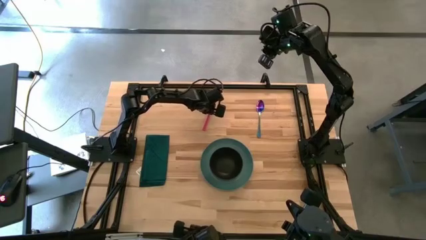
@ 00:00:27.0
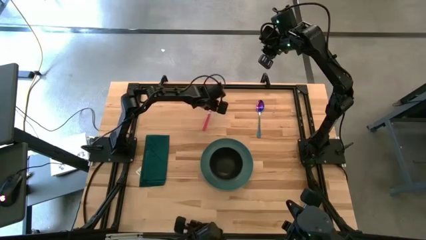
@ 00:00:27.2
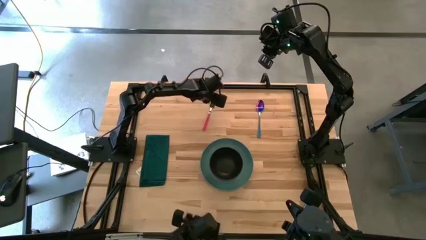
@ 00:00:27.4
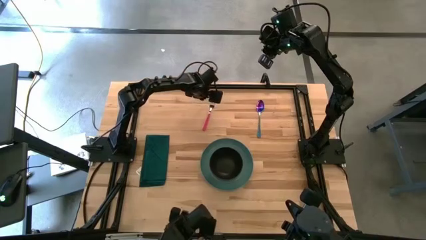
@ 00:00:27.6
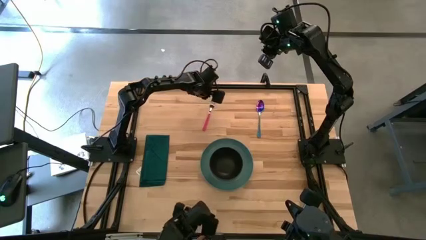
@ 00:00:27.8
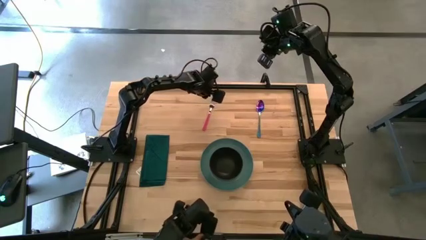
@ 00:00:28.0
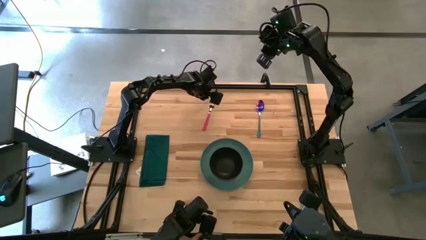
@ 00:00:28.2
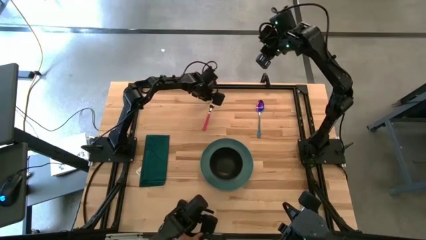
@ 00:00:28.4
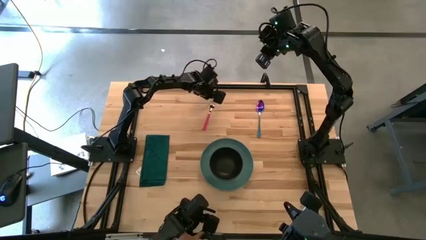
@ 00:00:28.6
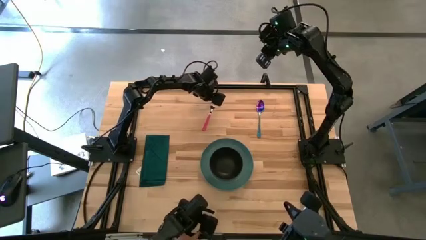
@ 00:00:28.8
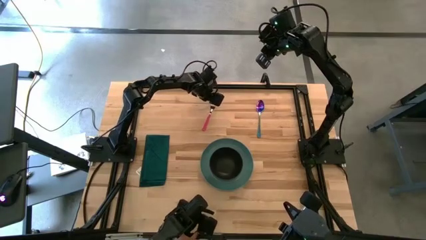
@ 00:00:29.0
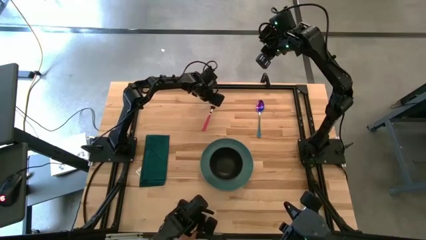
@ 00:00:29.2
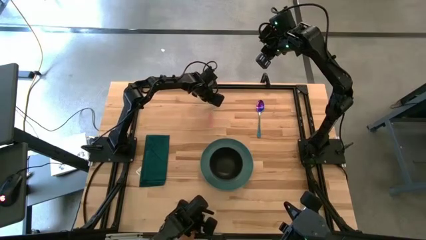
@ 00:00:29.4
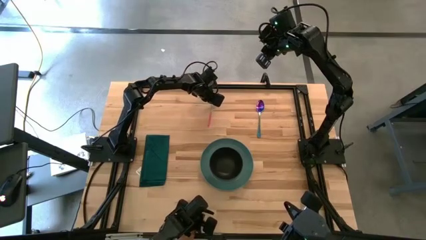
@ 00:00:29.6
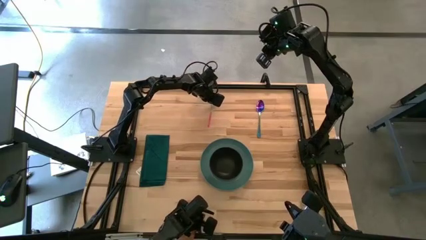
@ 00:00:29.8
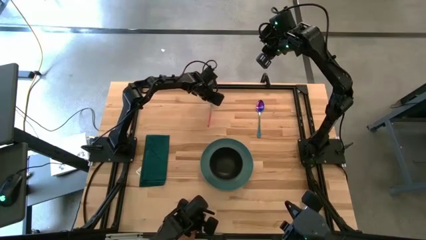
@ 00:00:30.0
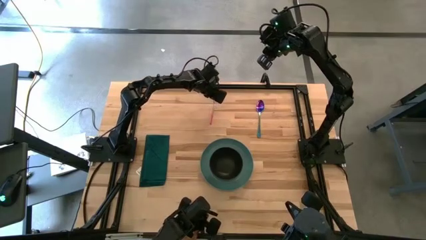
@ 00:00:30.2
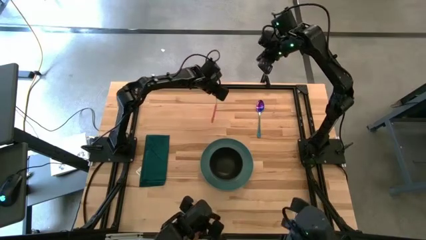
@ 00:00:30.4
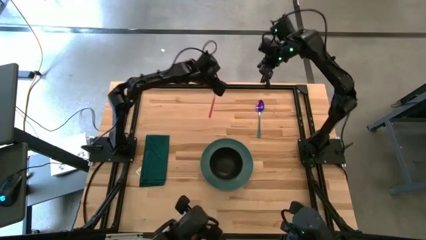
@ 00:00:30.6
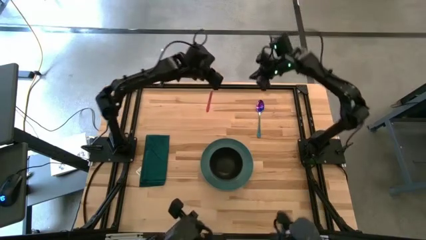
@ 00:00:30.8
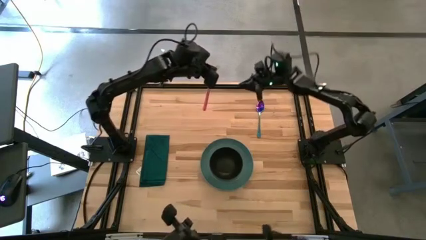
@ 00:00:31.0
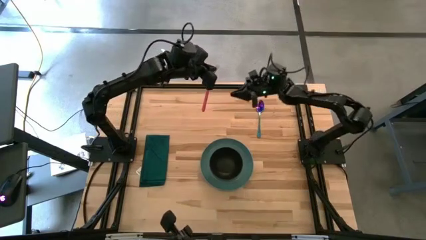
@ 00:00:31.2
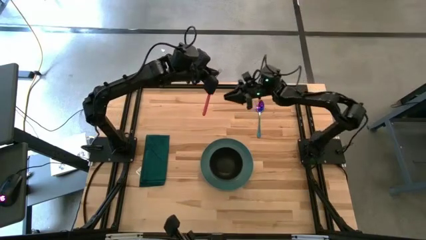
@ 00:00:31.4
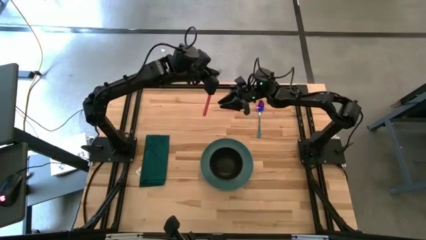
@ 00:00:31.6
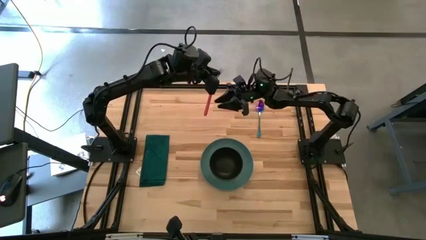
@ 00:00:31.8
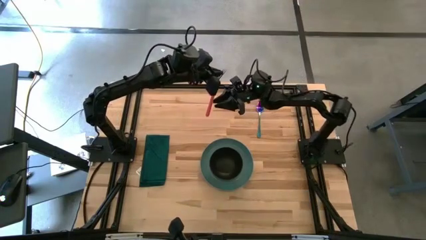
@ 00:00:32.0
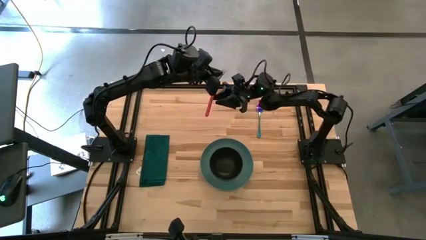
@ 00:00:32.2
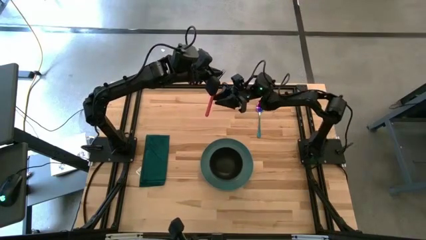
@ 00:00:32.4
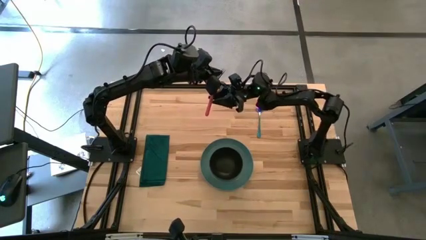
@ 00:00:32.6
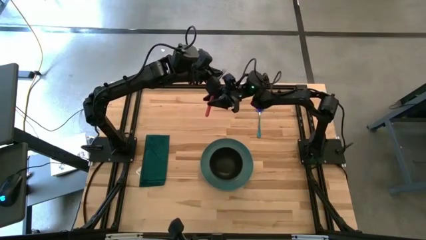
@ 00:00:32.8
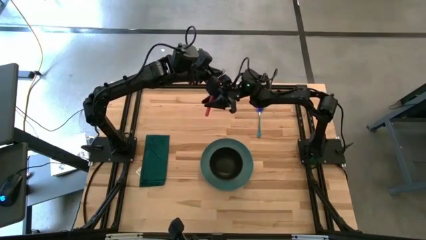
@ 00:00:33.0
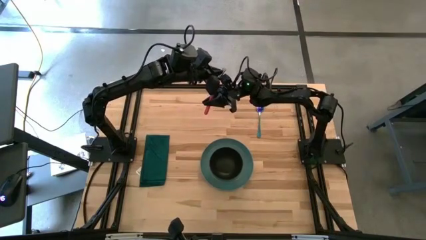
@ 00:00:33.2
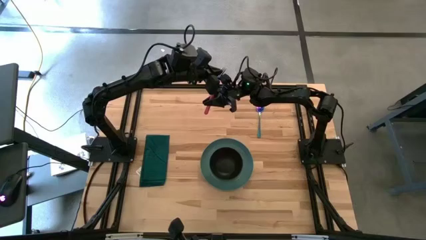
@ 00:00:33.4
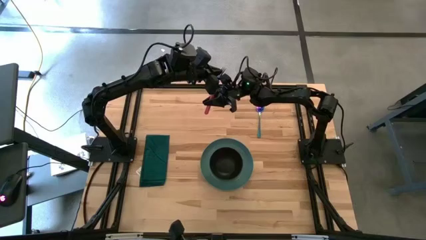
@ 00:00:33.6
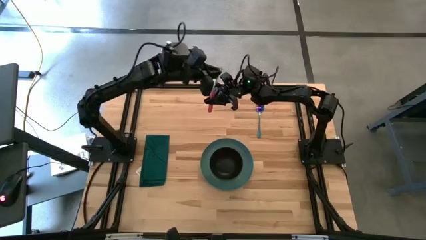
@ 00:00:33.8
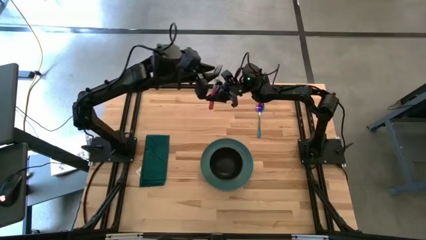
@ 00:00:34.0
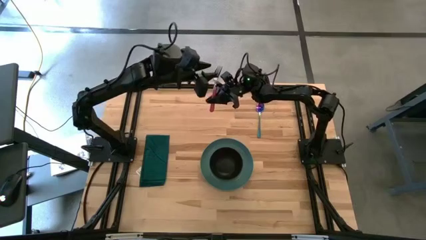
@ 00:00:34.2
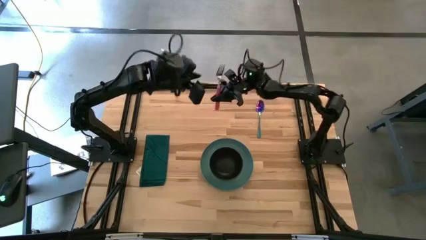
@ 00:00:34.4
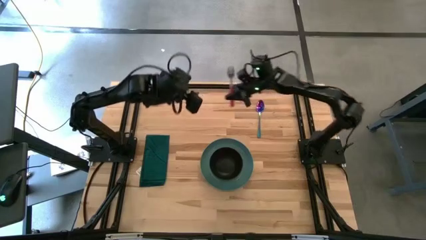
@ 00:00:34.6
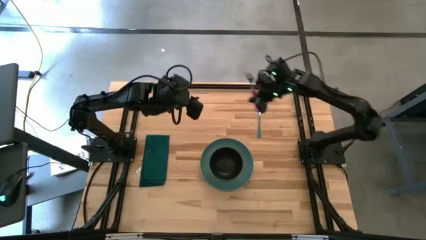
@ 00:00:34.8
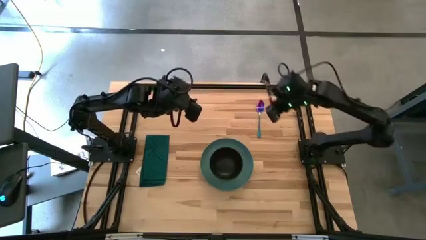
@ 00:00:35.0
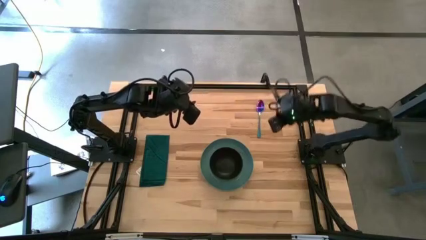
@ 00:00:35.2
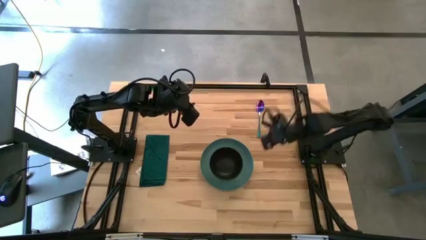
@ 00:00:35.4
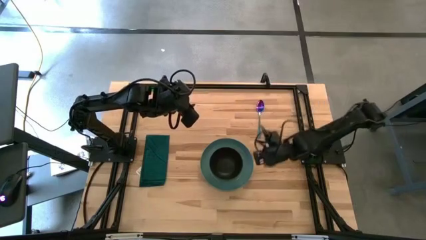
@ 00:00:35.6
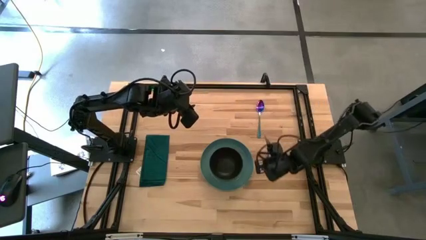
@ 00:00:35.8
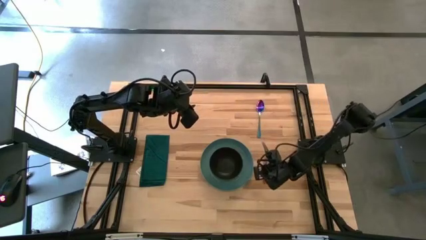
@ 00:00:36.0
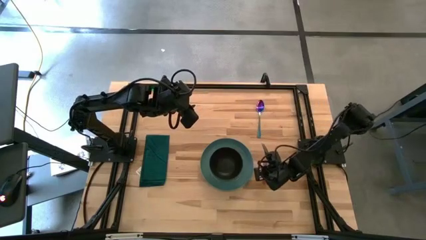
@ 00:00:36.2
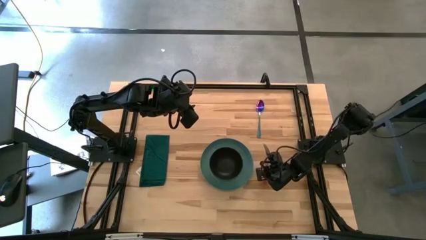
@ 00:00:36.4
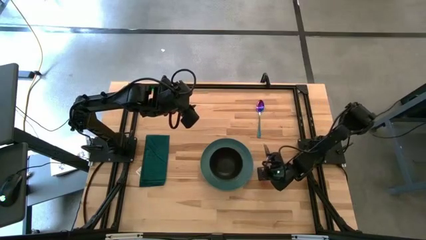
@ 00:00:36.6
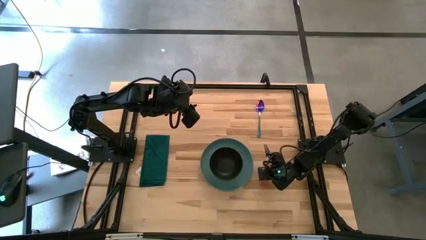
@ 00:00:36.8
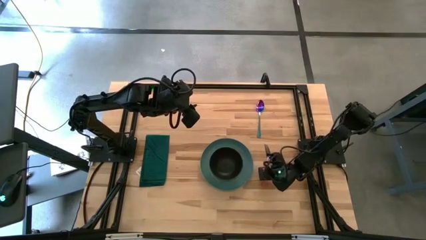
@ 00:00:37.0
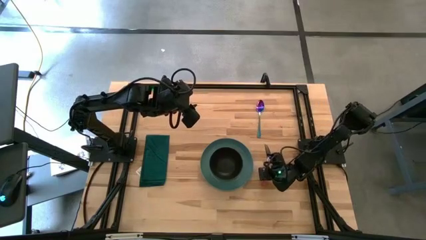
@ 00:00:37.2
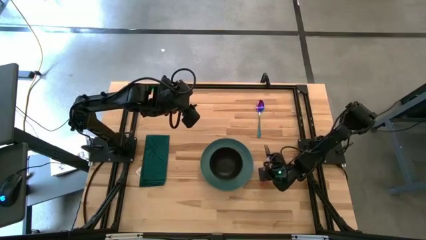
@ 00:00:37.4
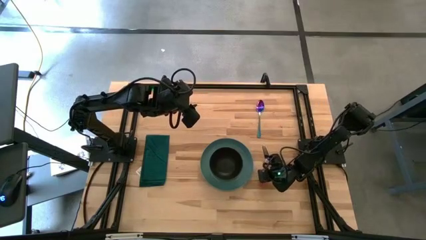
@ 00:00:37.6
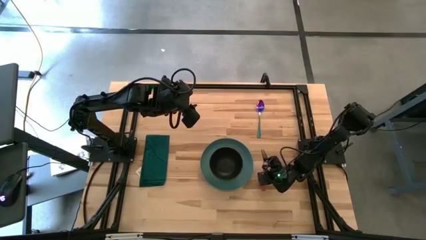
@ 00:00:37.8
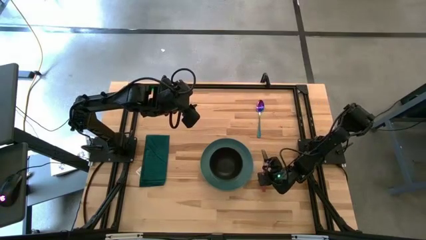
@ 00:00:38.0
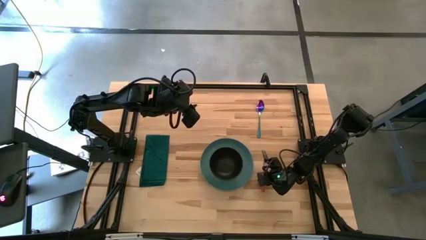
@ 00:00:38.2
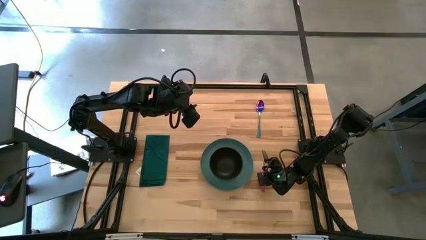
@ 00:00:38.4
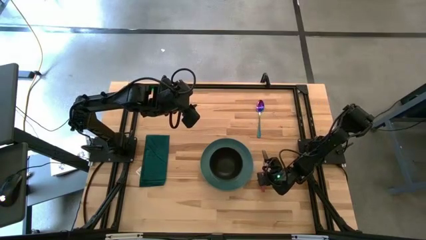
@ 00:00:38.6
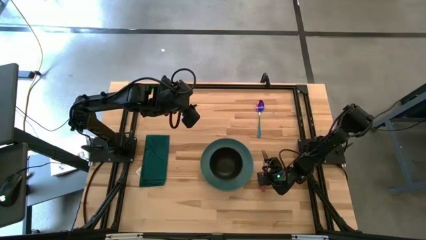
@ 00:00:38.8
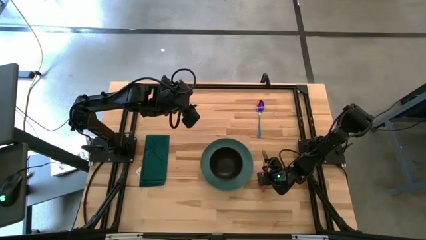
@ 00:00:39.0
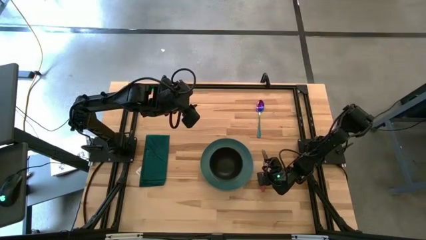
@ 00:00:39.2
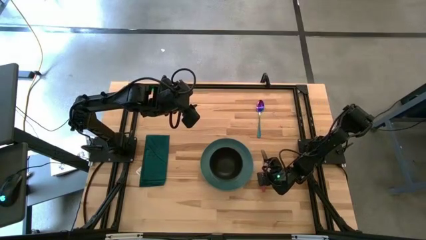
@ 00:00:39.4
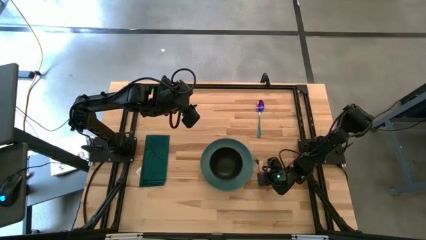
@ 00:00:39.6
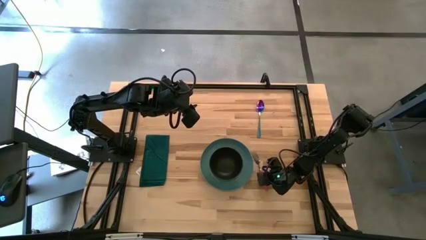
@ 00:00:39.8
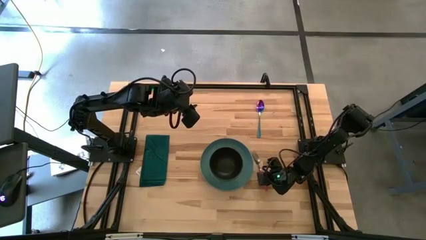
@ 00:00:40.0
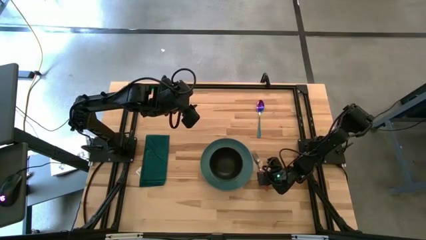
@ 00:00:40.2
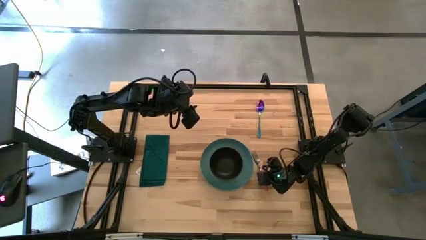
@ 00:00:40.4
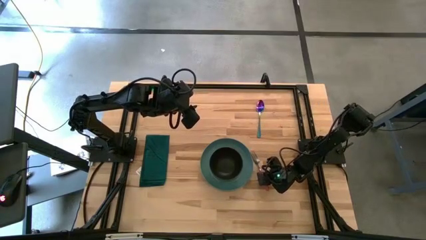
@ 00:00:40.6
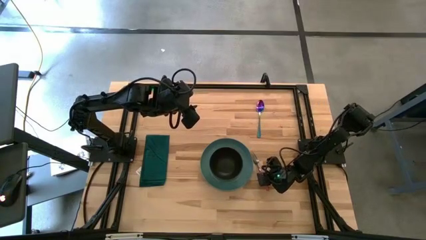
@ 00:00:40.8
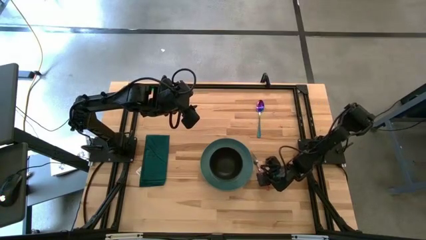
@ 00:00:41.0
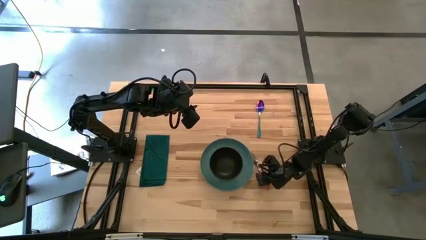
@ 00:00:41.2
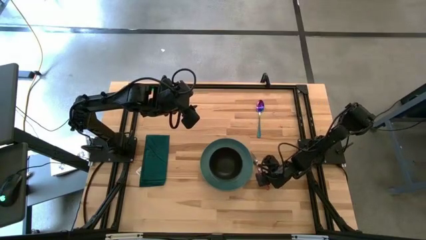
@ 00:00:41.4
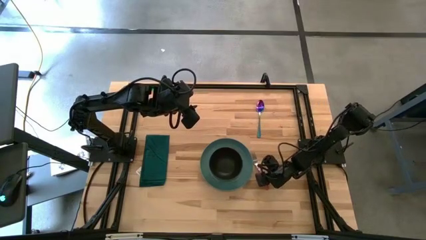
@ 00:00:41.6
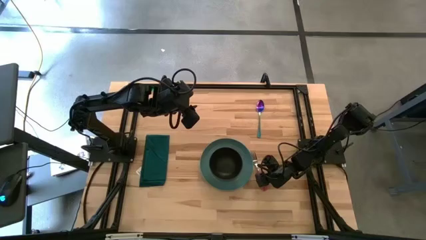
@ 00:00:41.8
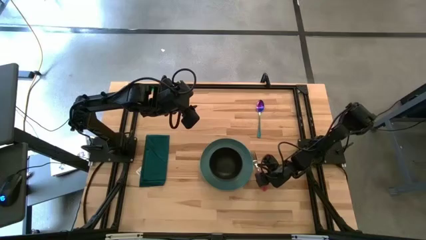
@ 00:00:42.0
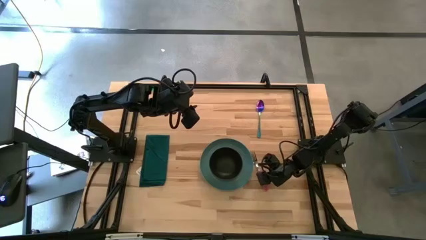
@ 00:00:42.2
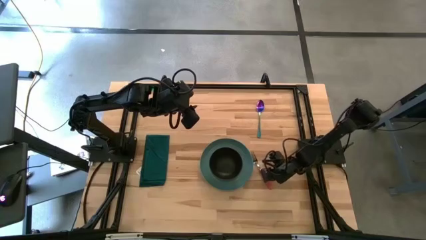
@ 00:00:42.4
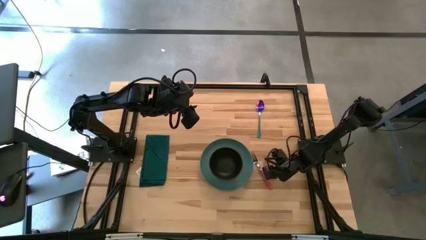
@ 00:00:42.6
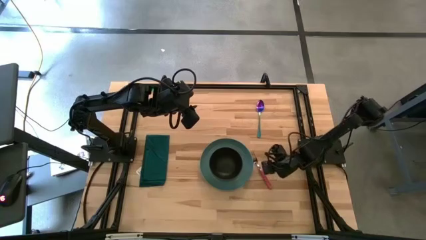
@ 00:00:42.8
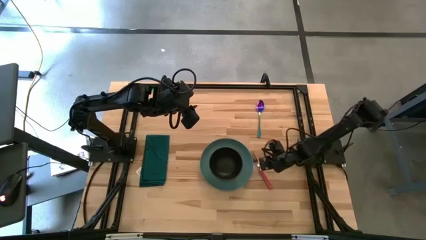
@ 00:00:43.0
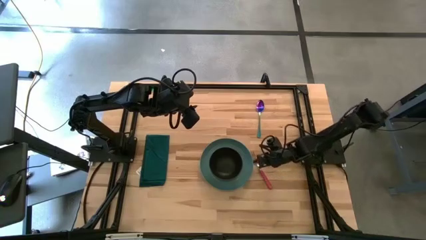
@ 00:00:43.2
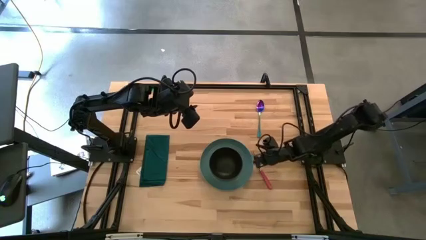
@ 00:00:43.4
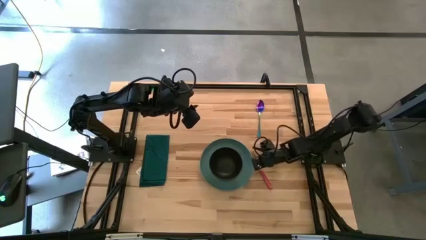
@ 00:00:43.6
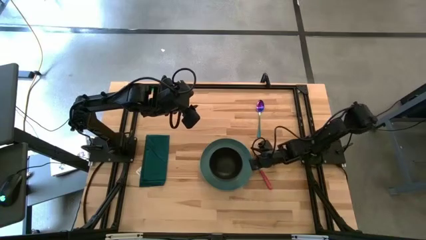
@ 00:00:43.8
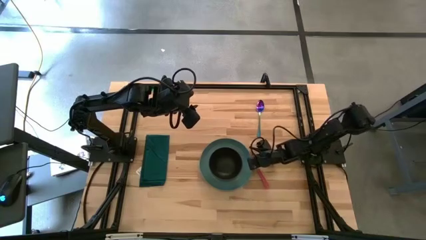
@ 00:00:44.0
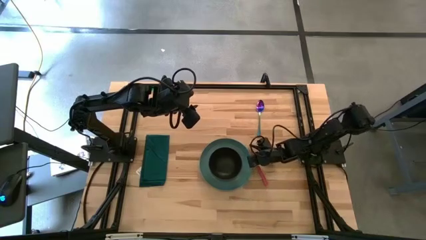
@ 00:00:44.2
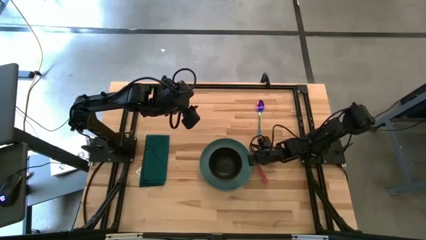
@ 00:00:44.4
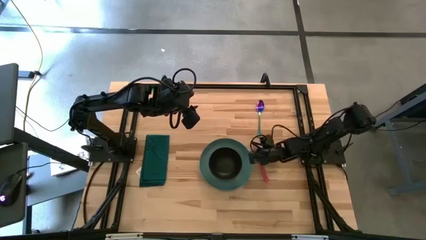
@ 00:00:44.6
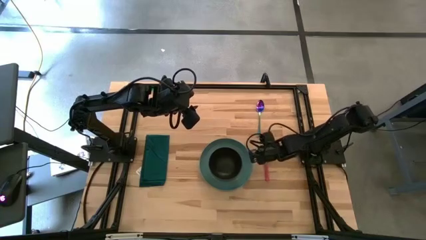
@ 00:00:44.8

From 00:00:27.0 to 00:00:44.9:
Task: Set table place
Put the red fork to the right of the blue plate
